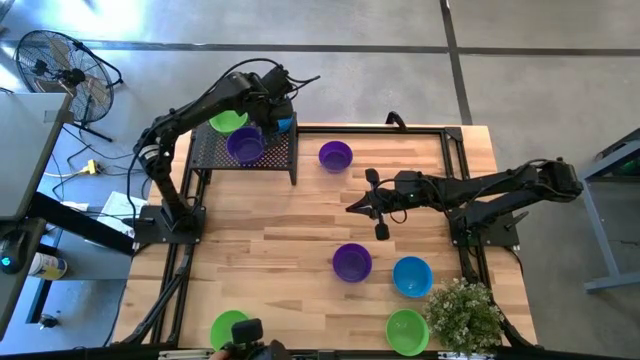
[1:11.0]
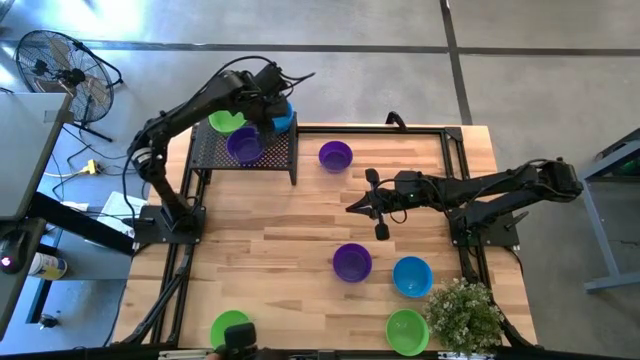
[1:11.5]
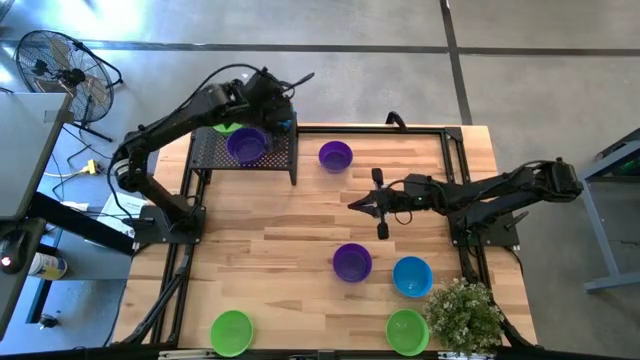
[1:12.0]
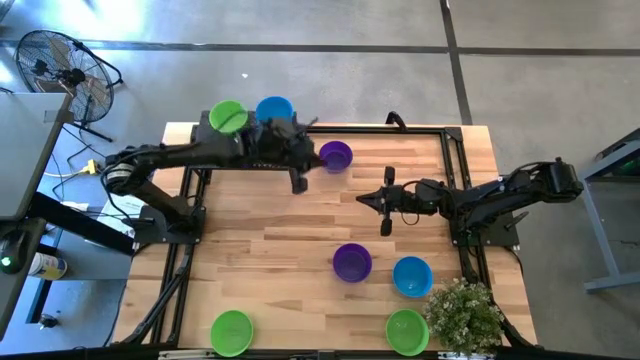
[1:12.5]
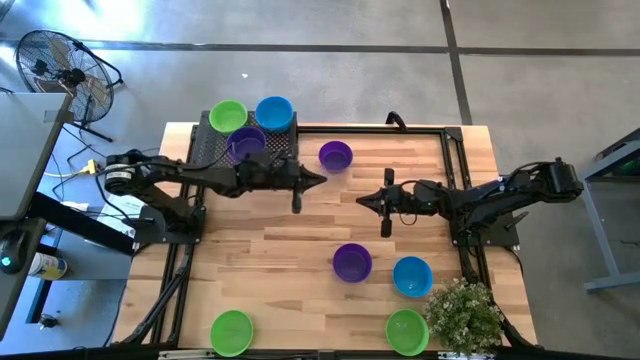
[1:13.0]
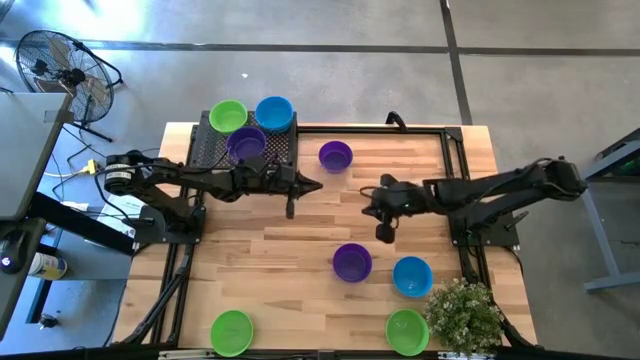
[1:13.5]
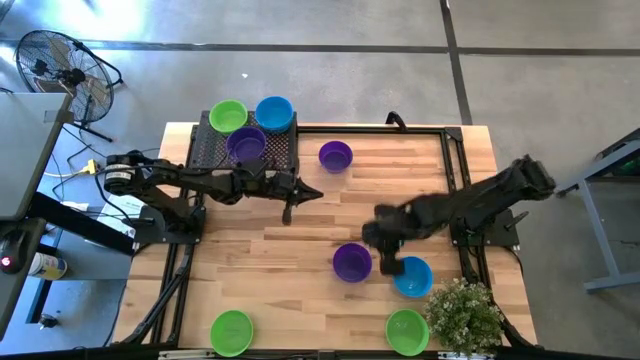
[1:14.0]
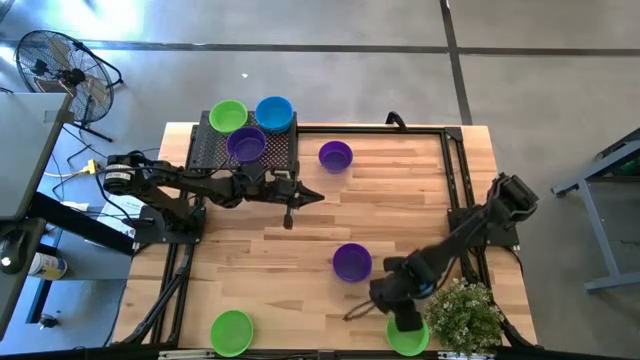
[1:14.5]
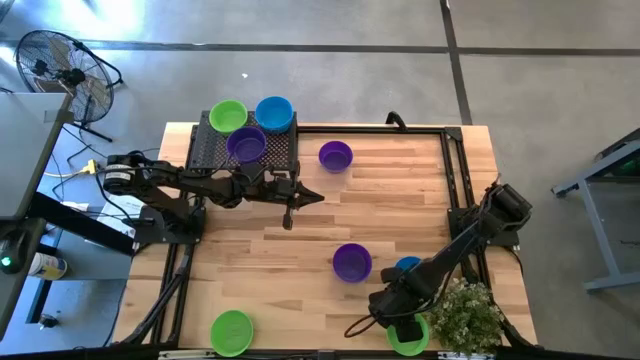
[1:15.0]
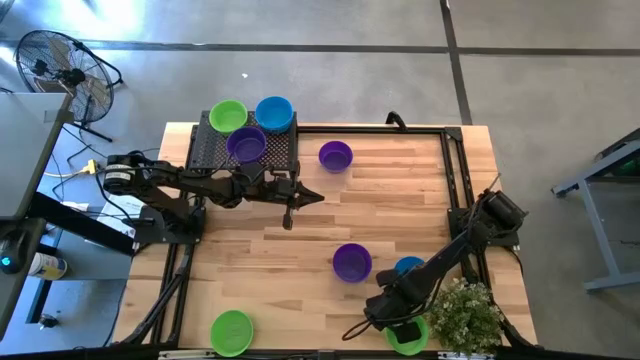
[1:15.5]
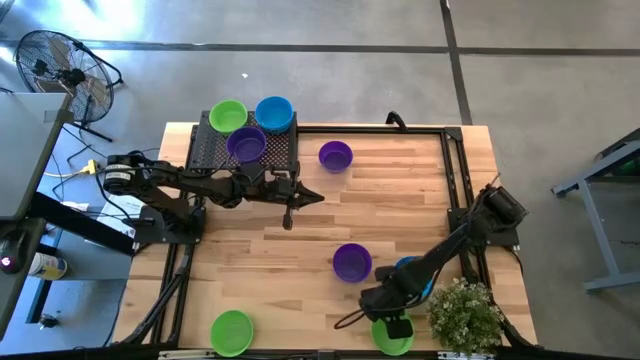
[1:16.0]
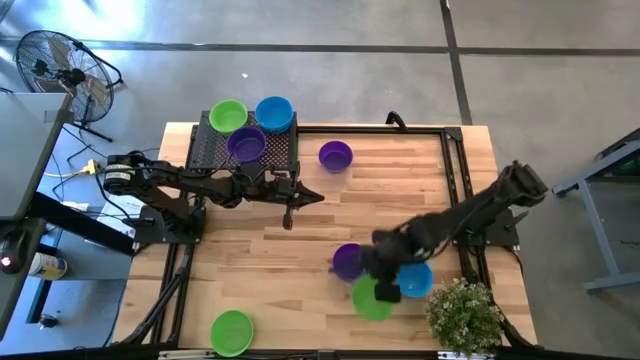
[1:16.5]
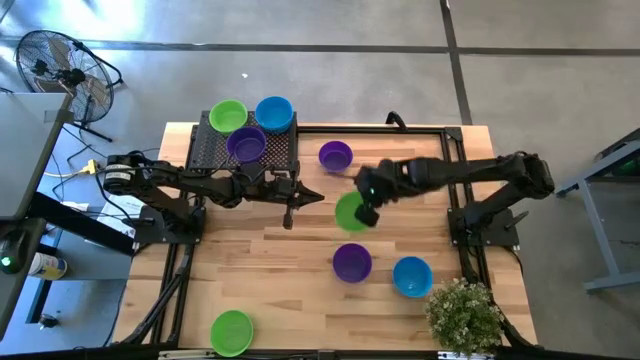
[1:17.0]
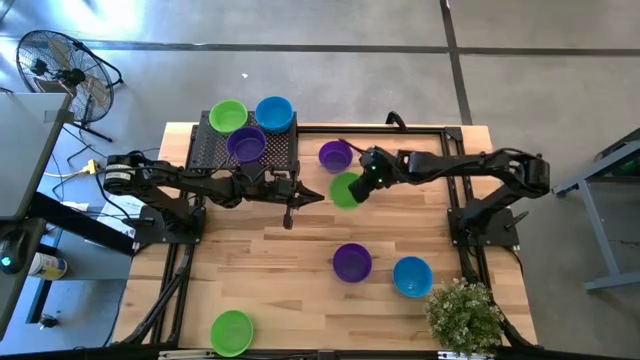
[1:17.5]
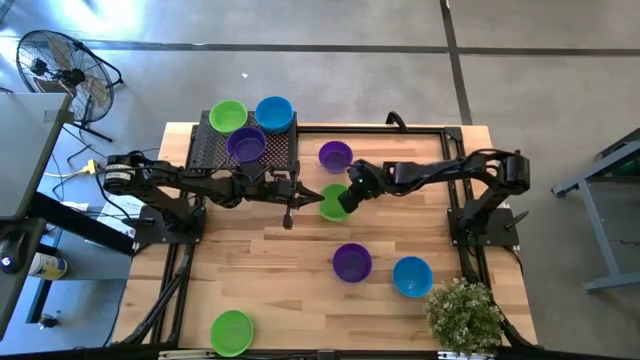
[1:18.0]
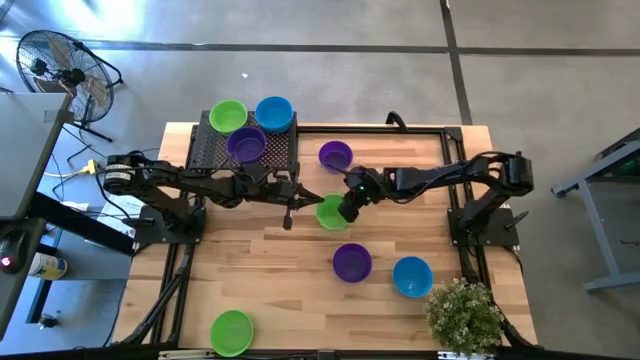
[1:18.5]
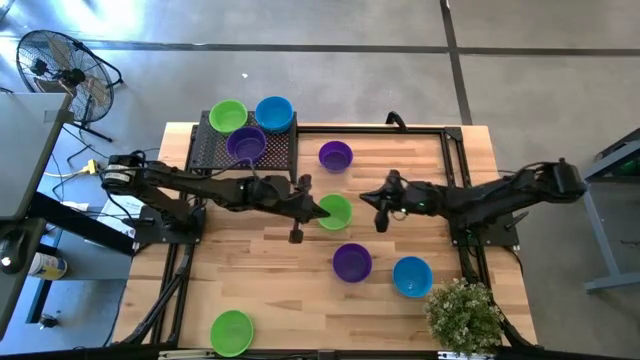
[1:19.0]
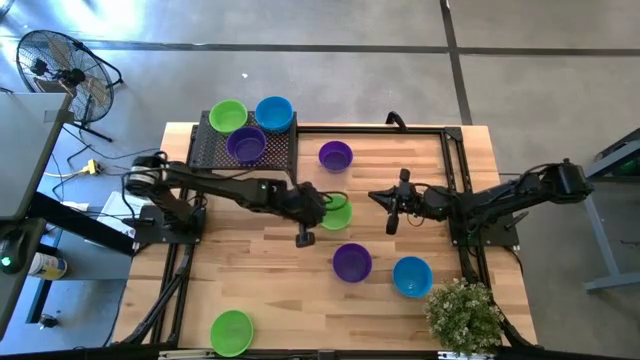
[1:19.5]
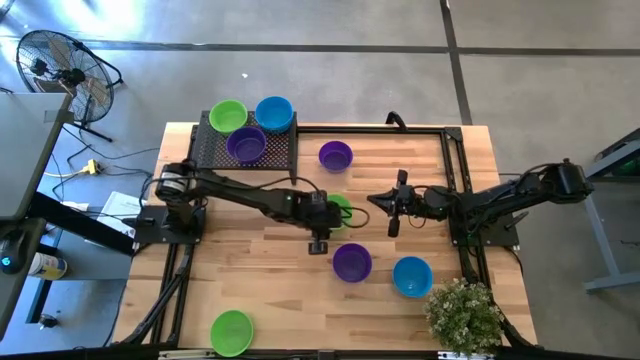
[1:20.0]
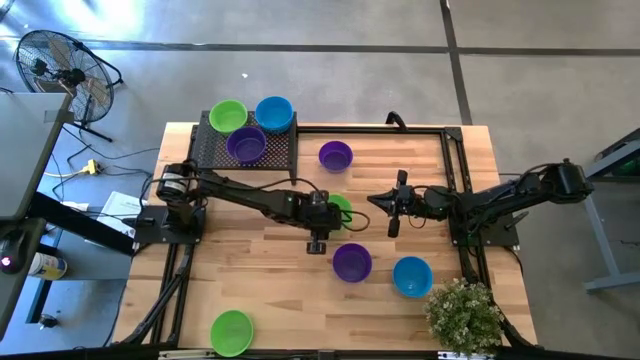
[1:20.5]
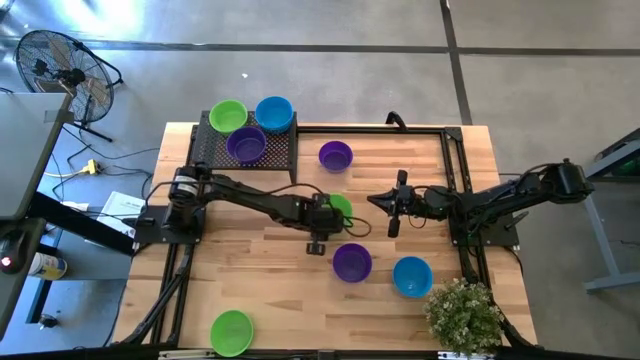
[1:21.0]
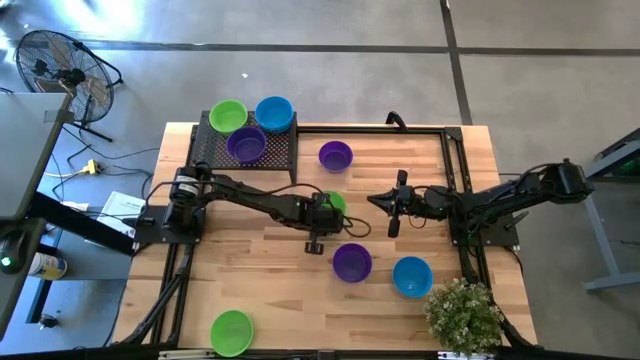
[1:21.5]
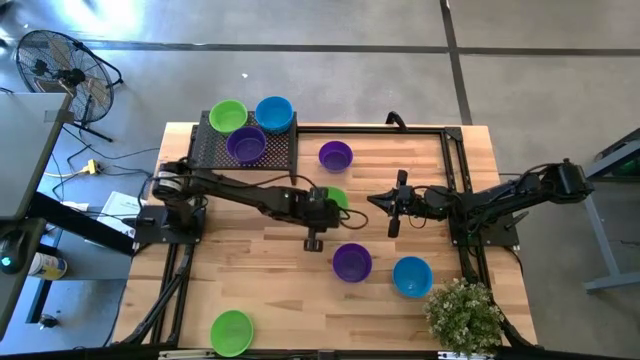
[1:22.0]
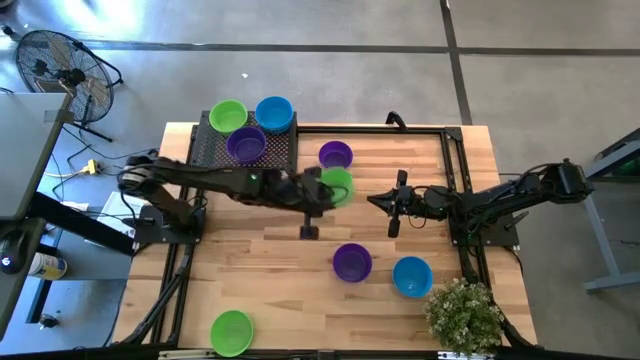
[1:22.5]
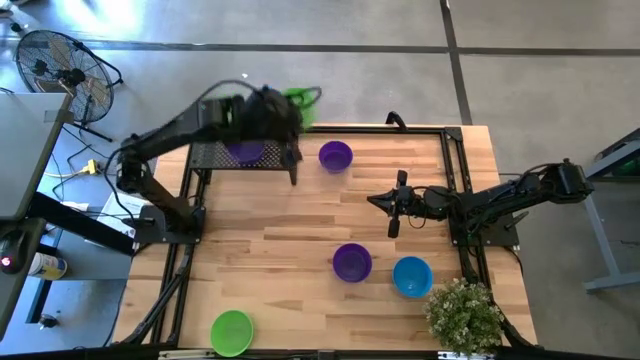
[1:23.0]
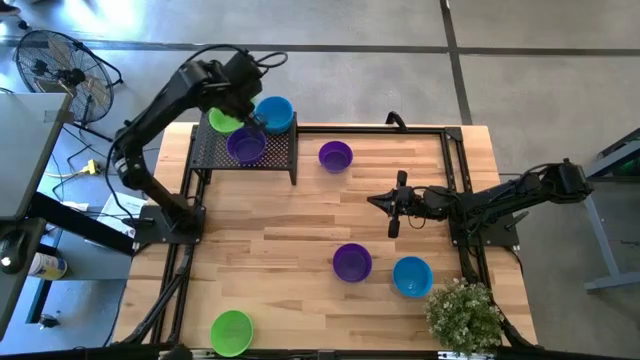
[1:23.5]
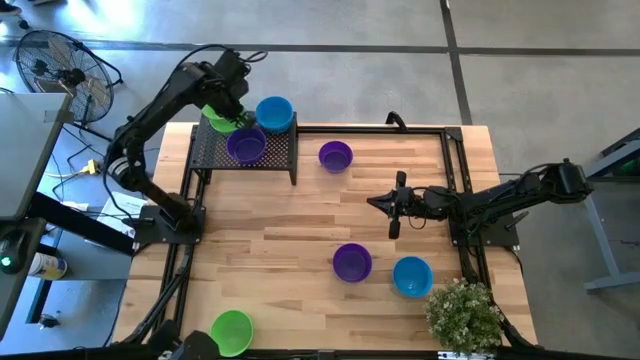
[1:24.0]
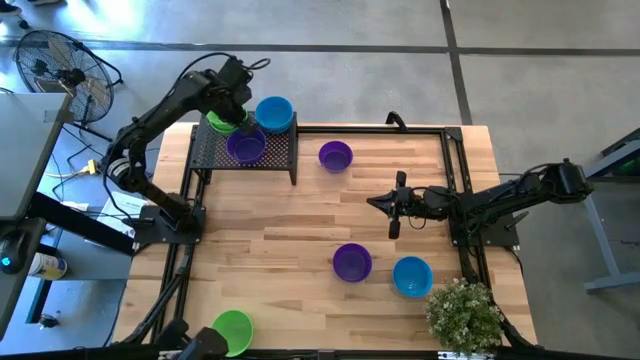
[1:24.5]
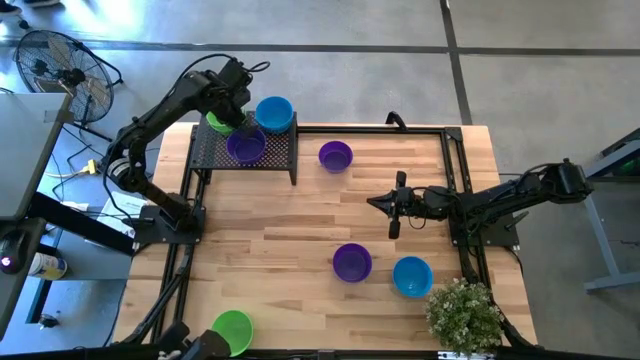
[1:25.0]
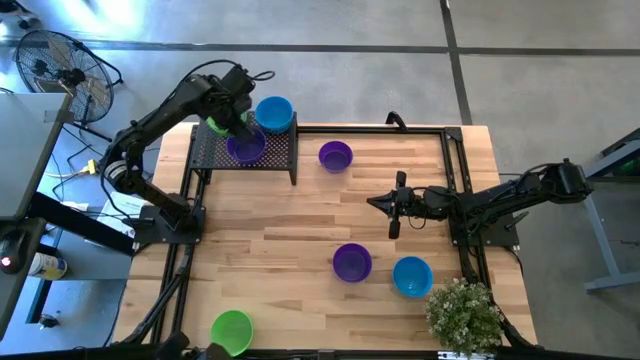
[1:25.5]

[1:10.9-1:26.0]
Task: Pick & Place Mini bowls
Stack the green bowl on top of the green bowl on the shelf

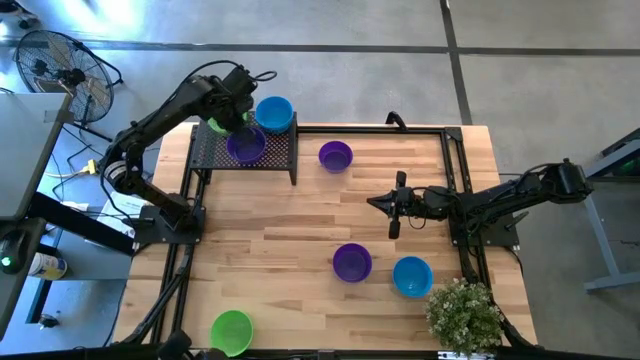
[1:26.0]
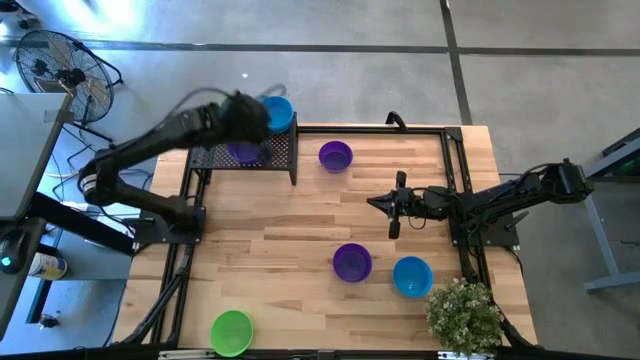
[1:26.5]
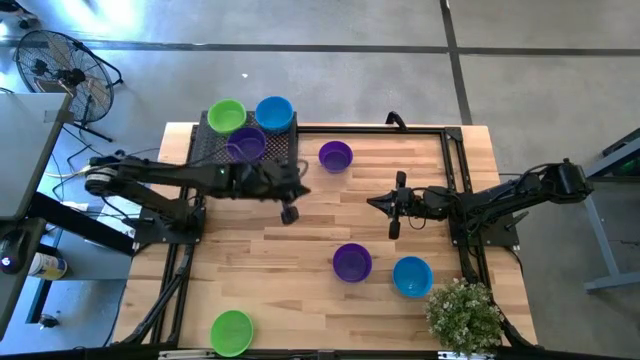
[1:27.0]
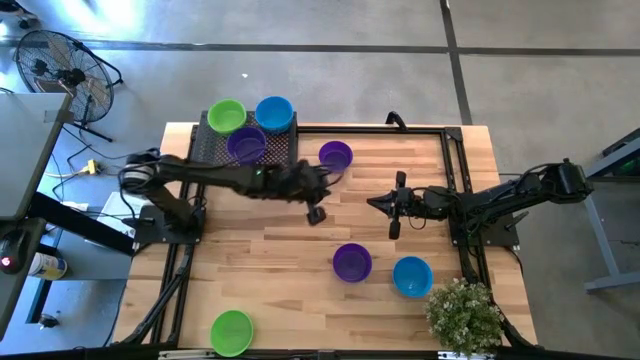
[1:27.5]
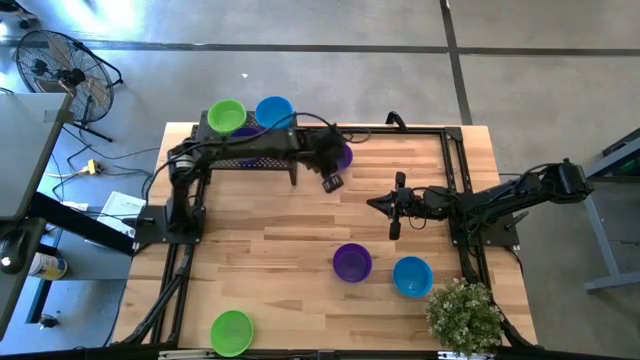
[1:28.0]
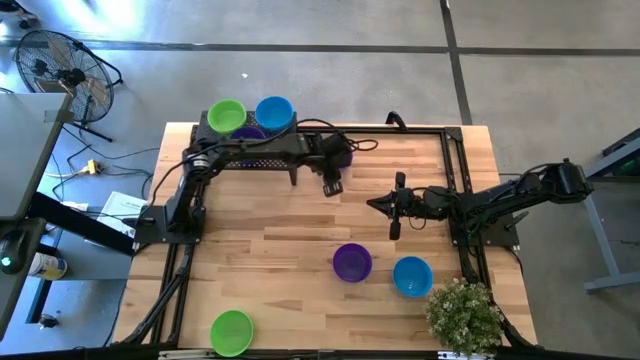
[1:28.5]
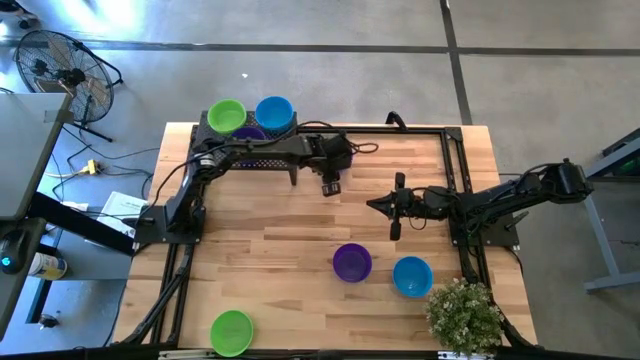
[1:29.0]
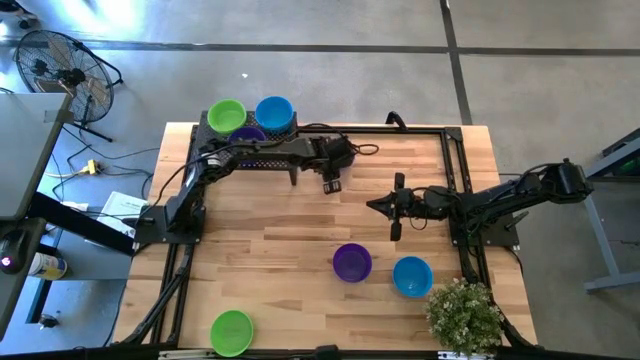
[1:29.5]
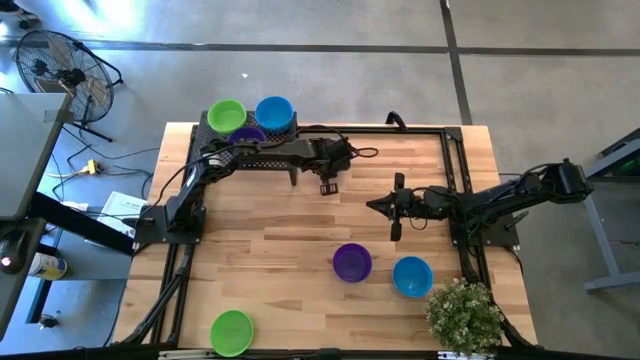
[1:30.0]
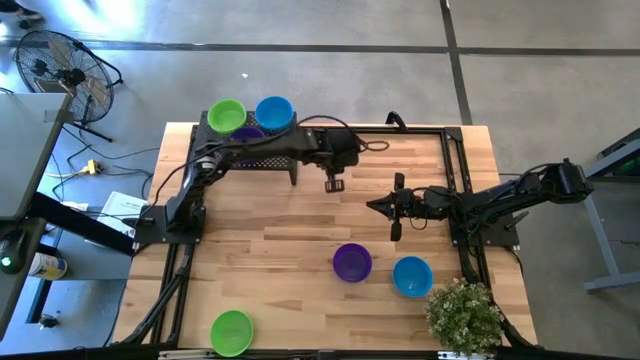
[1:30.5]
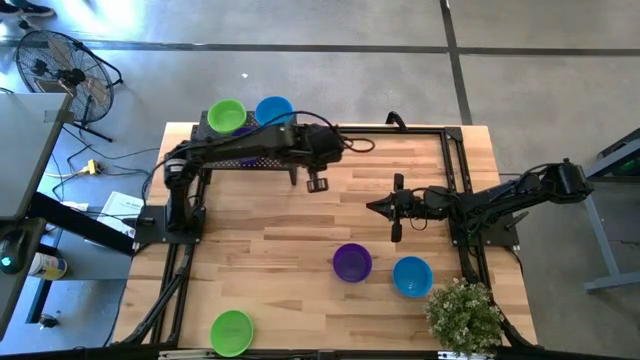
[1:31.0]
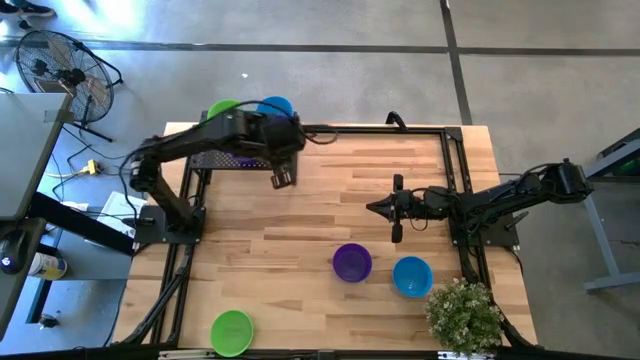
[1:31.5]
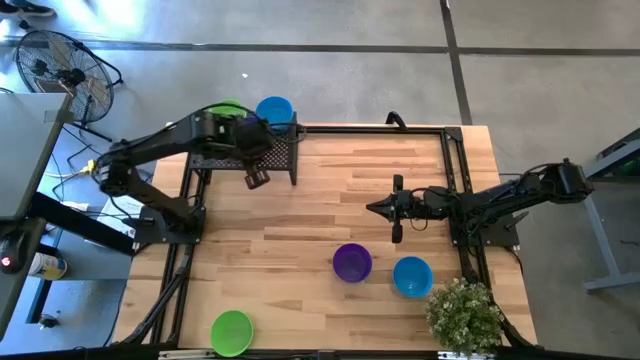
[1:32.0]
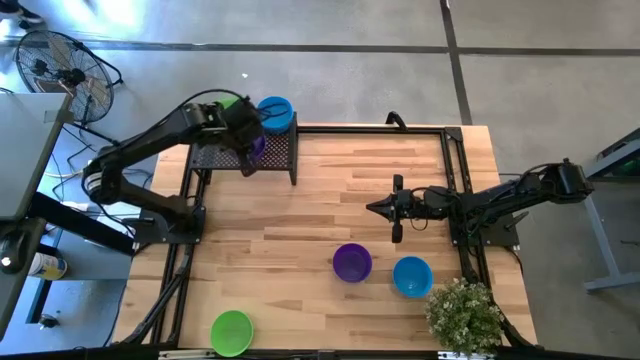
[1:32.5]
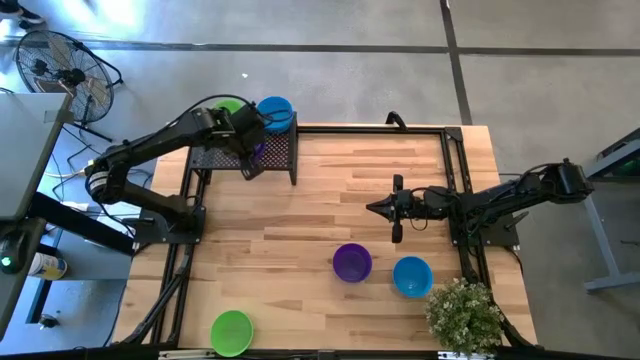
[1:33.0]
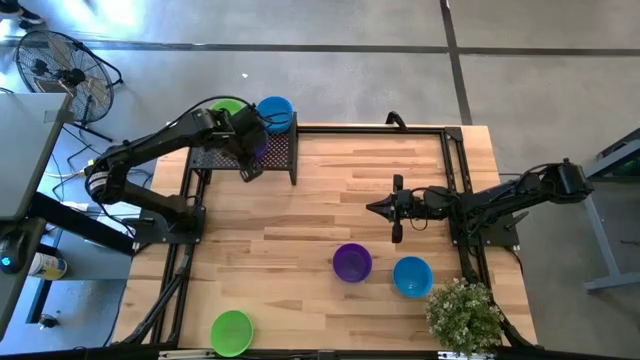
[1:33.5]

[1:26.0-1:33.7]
Stack the violet bowl on top of the violet bowl on the shelf
